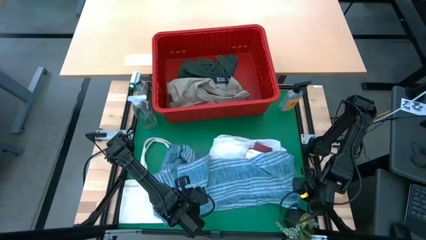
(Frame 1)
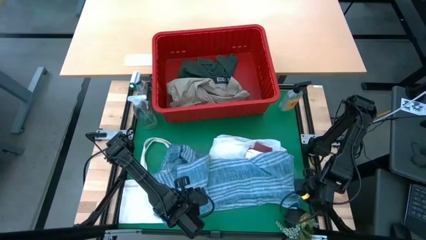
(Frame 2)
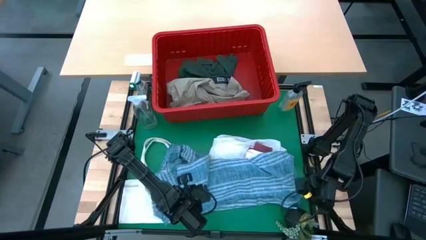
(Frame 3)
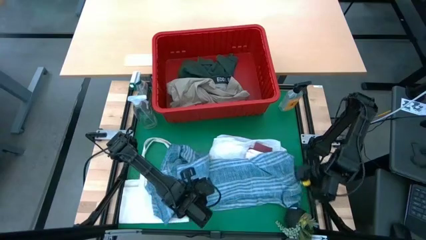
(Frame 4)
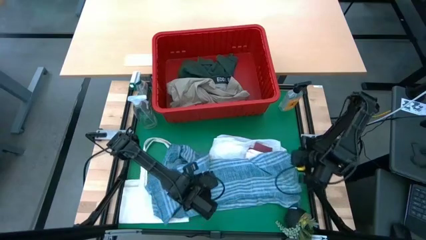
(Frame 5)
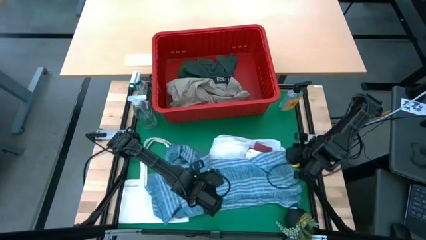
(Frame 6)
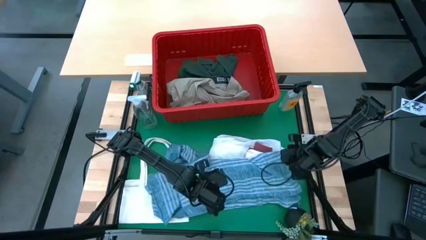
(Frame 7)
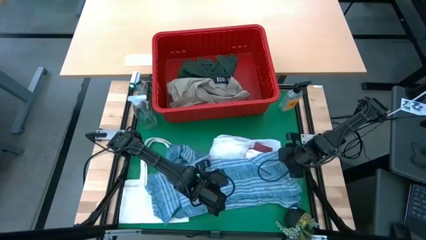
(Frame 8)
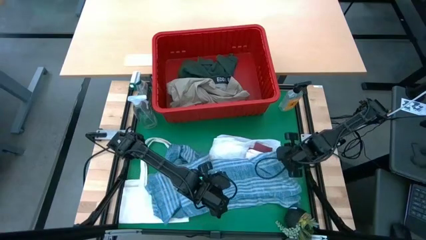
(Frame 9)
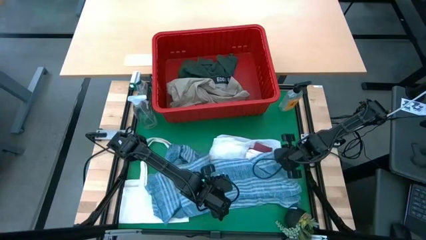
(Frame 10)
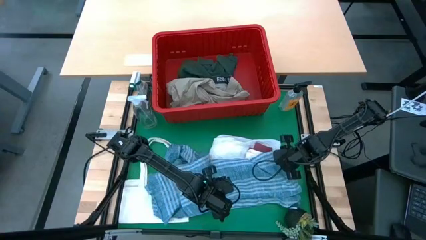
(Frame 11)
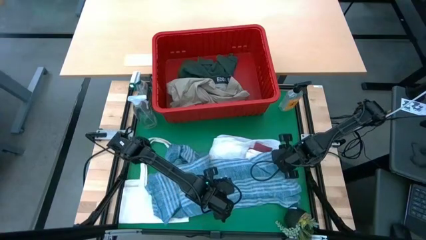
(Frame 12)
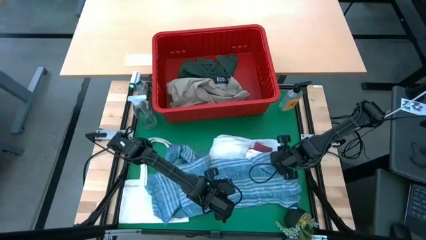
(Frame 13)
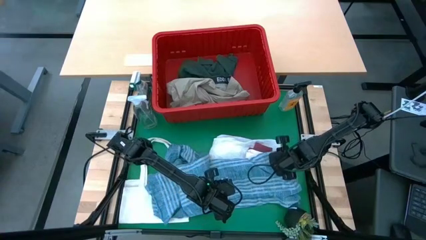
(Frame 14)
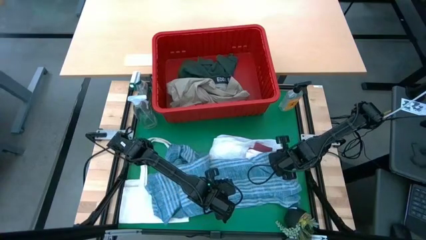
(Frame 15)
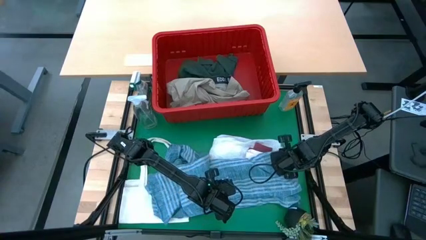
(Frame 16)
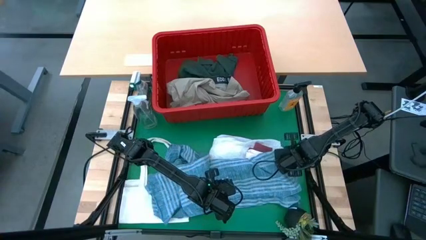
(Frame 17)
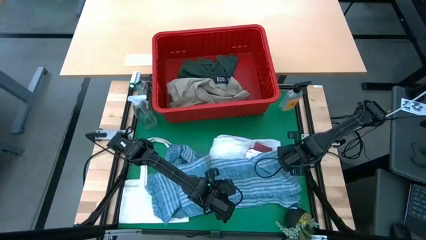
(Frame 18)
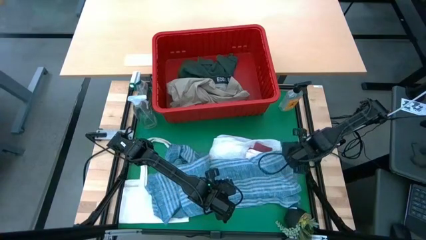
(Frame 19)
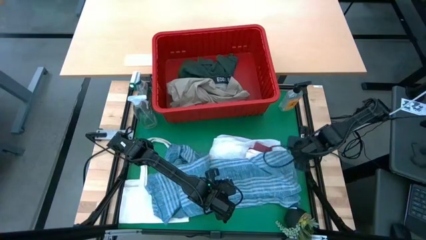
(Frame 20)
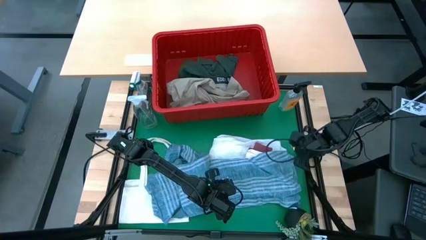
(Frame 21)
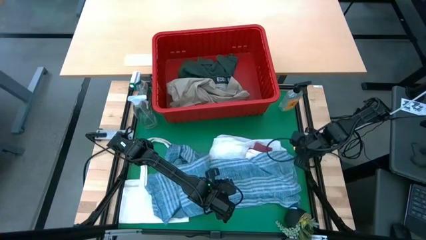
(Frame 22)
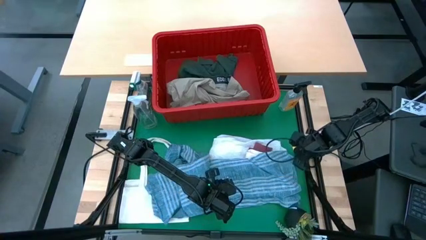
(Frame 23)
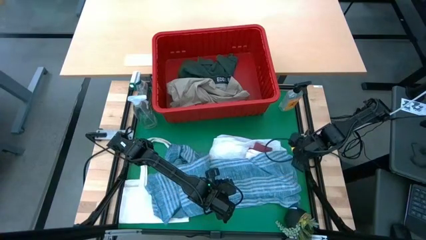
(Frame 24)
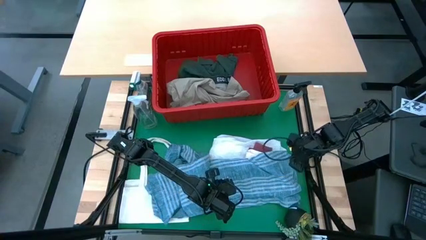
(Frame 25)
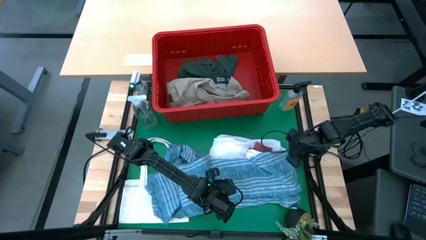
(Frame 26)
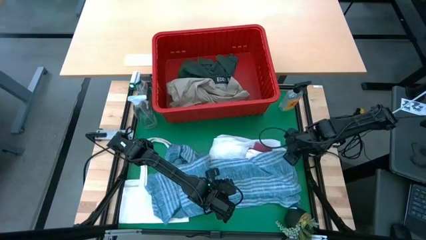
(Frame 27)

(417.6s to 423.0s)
Task: Fold Laundry from Bin
Fold the blue checkered polo shirt

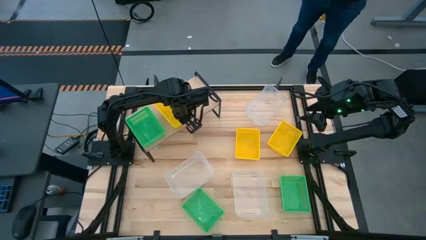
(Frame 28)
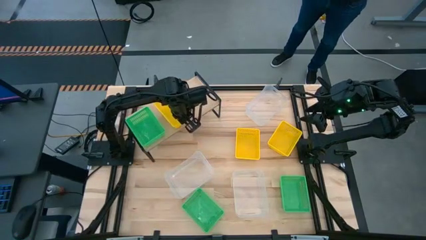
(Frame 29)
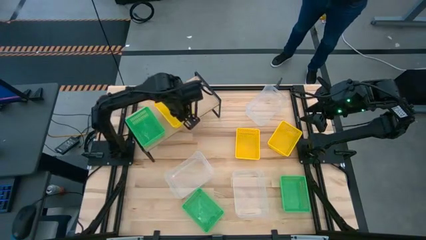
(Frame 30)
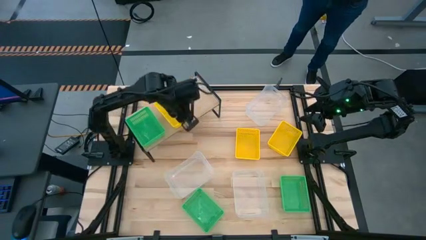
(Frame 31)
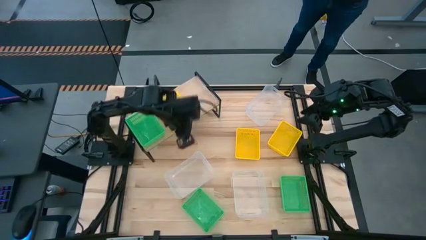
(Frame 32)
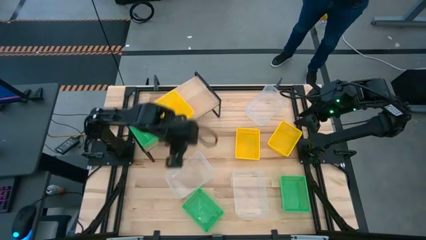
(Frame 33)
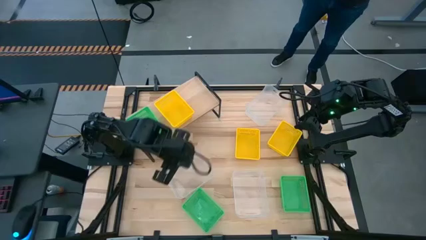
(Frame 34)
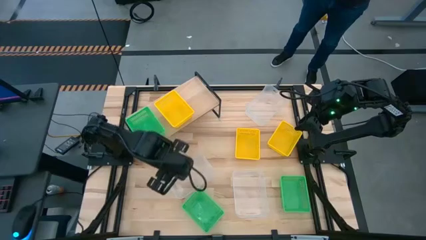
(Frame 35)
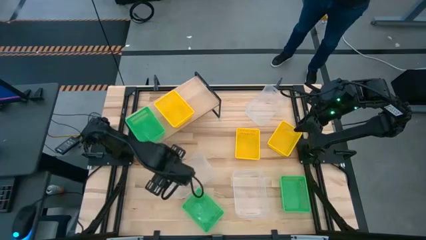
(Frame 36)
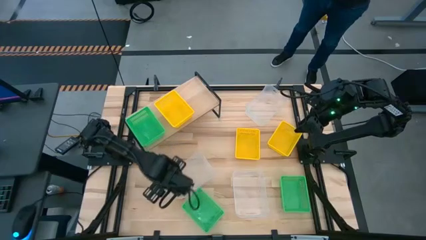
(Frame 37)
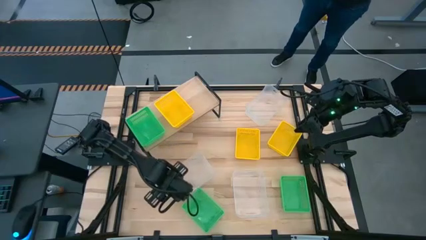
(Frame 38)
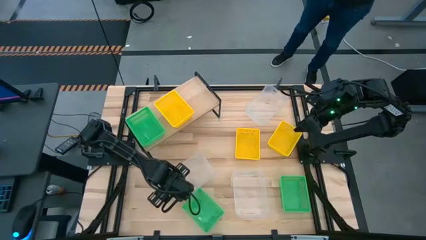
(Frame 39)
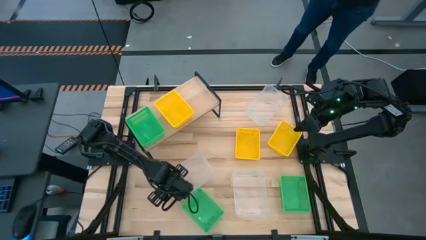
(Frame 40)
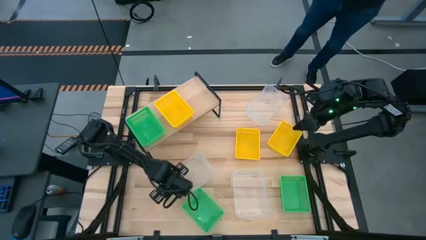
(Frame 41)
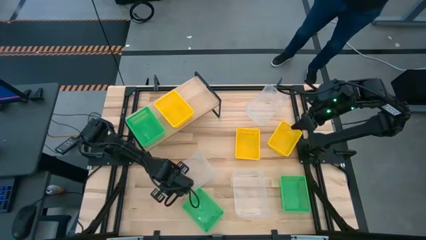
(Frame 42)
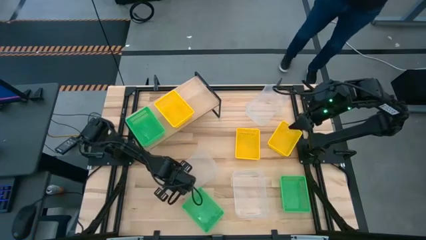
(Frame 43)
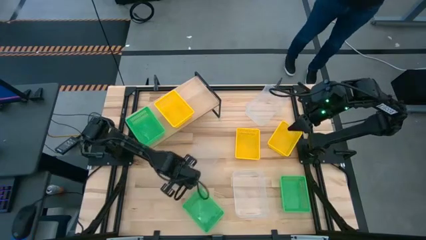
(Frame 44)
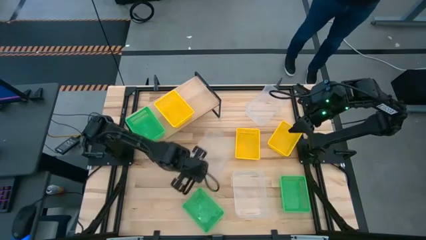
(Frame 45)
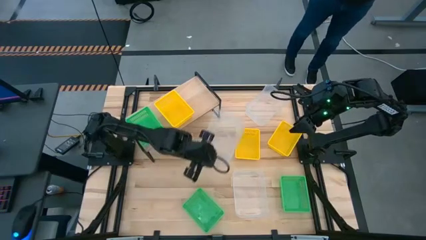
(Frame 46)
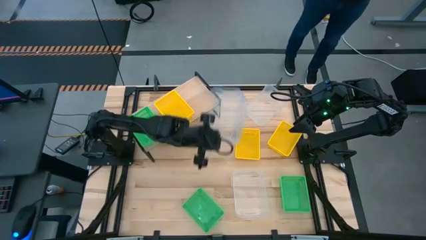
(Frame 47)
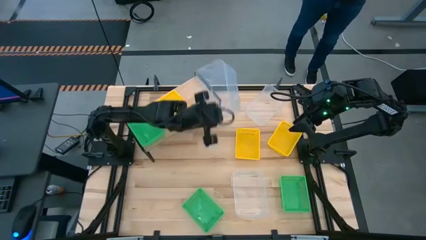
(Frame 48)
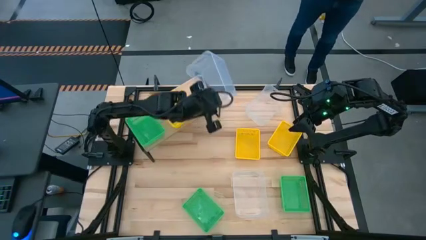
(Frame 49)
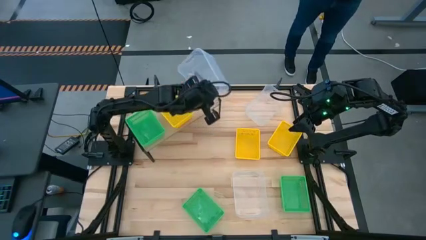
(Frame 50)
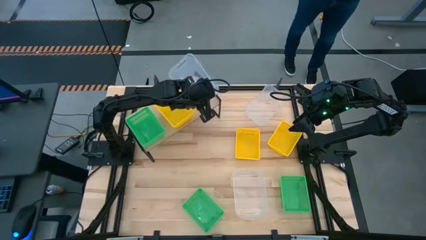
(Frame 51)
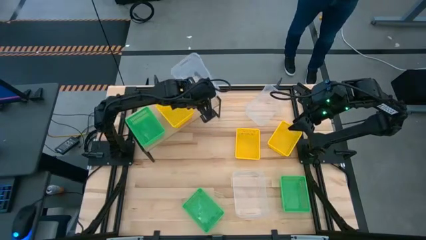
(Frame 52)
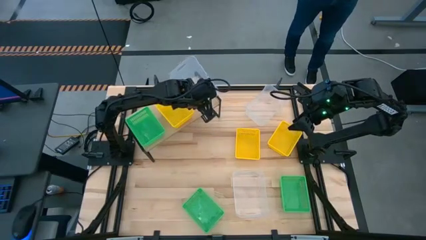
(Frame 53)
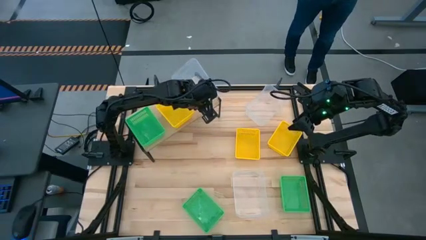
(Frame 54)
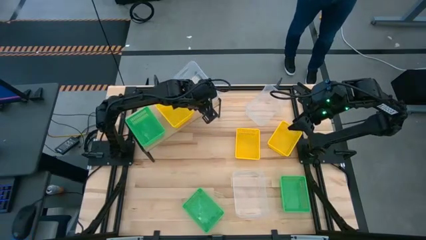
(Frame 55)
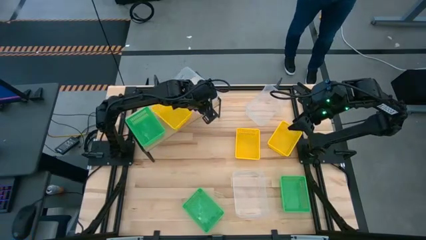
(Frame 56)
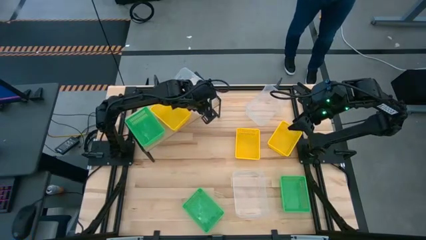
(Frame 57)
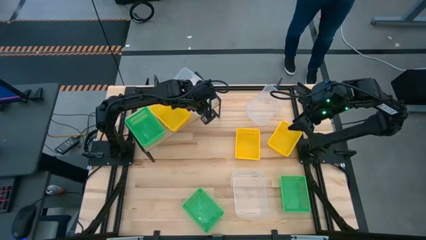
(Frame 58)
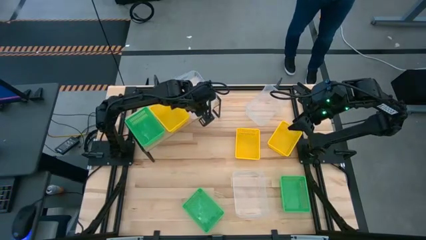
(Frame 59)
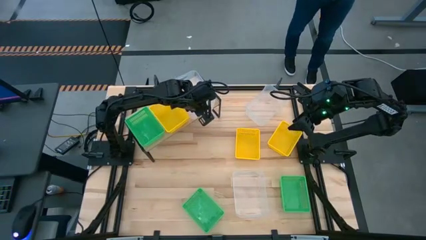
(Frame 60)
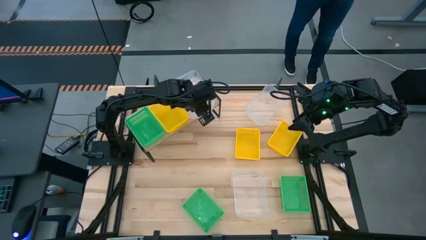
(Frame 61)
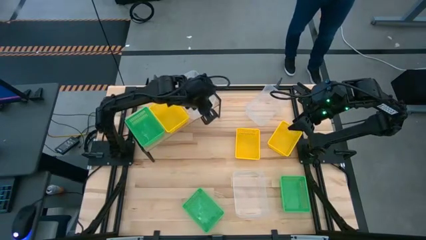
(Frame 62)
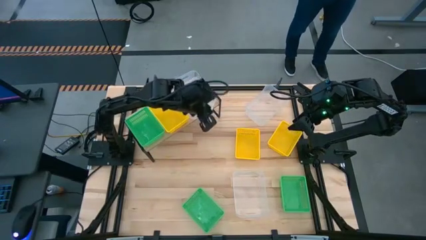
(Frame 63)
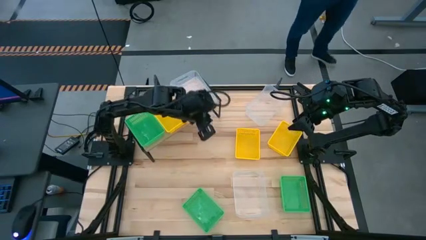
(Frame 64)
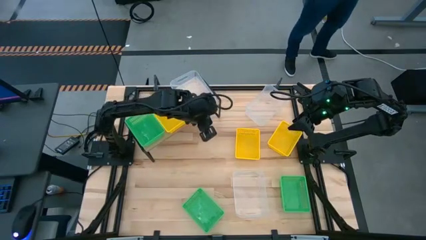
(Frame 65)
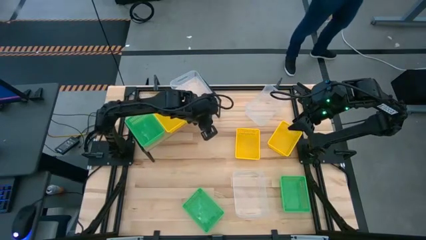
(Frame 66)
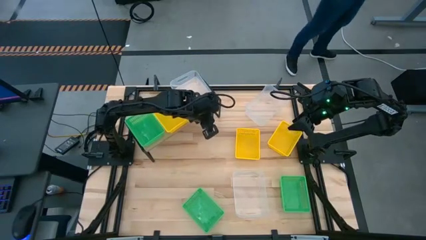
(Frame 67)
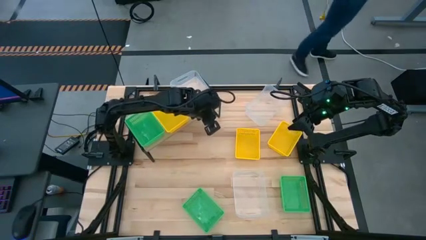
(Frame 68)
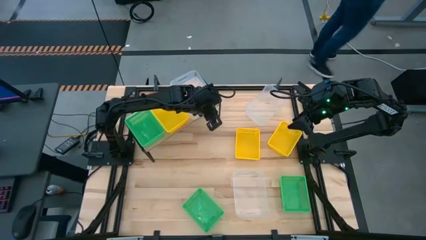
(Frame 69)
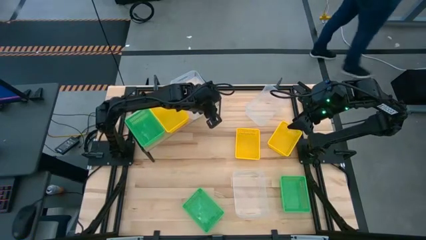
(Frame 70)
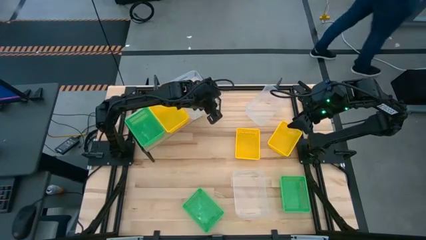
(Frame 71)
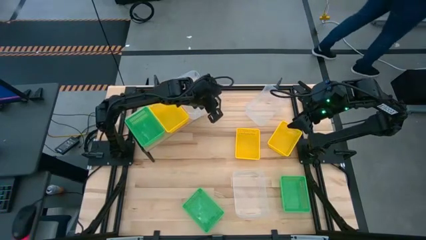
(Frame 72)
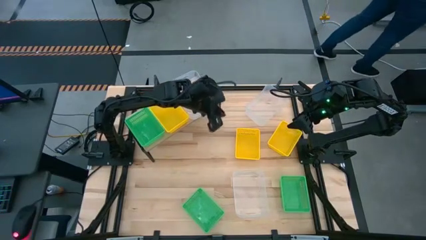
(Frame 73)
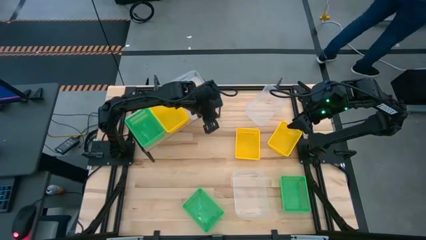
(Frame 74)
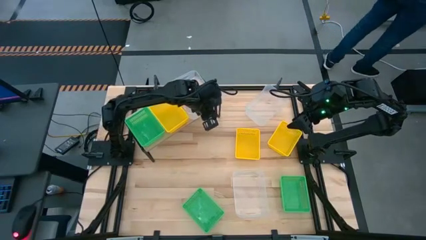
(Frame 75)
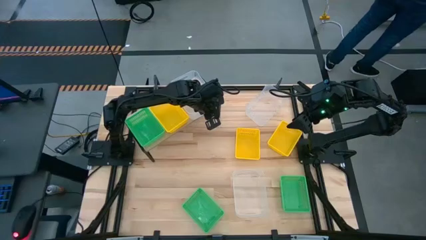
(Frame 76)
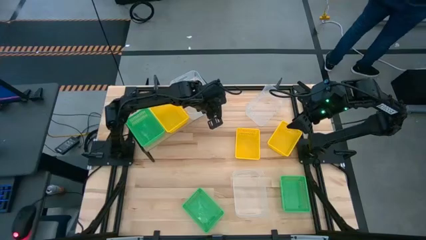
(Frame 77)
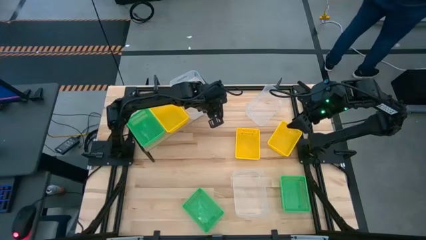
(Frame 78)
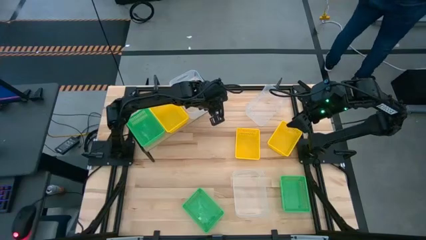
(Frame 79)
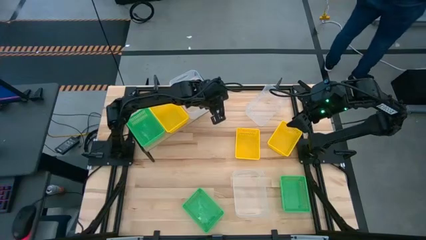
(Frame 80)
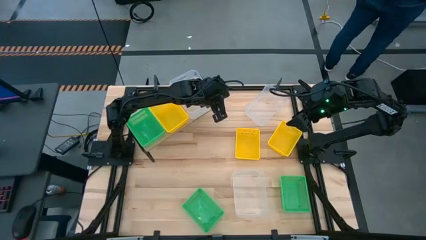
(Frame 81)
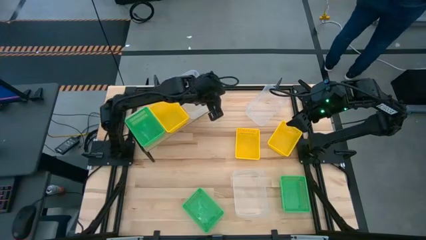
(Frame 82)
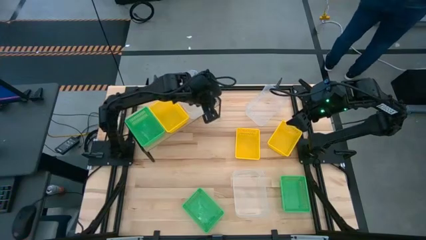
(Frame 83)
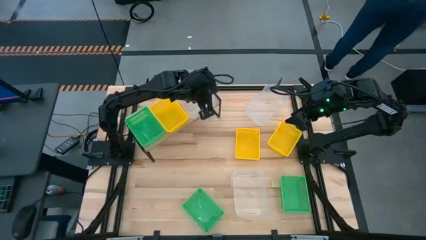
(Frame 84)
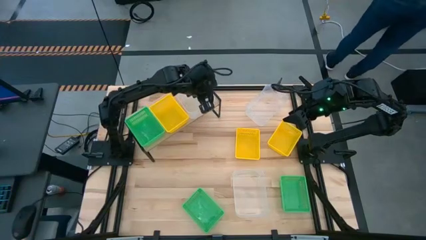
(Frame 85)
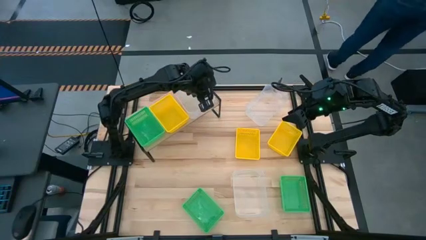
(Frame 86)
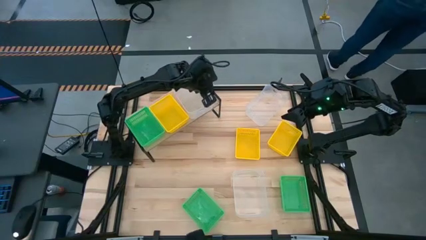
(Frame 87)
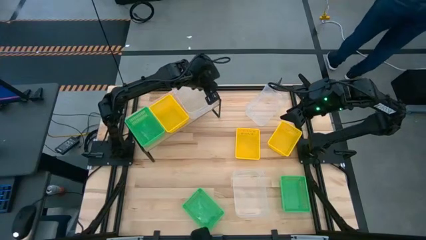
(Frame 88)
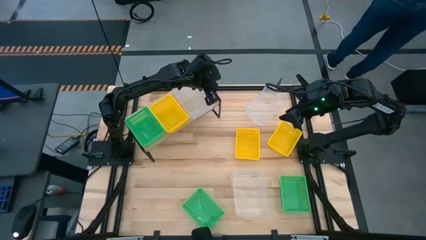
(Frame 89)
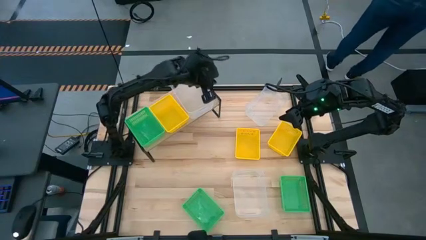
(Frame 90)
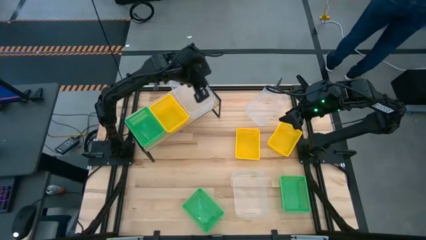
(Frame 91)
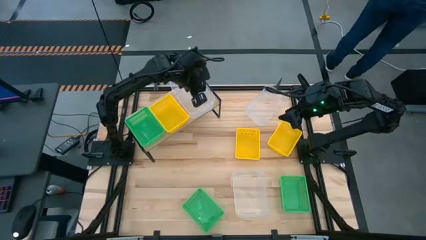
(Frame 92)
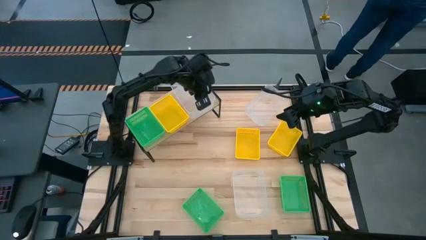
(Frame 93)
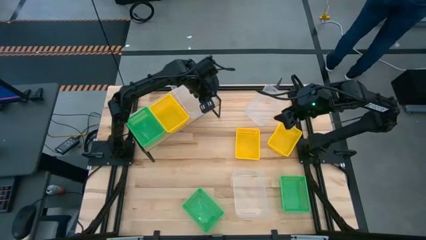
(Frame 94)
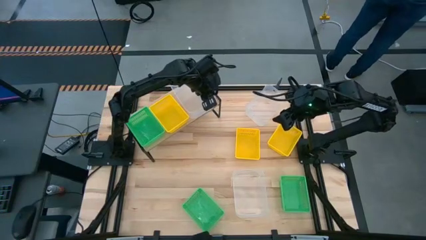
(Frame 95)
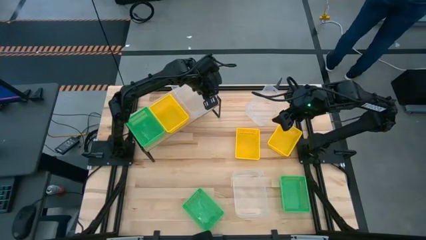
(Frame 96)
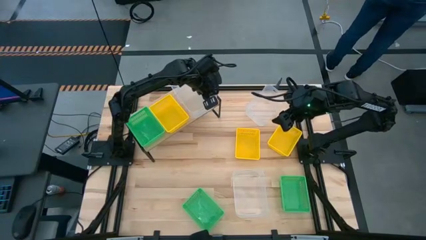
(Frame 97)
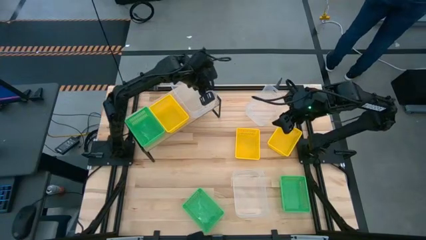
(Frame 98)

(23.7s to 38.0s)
Task: Stack baskets on shelf by color
Put the bottom left transparent bin on the shelf
